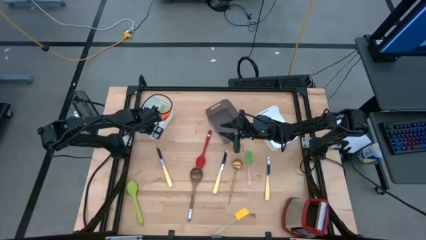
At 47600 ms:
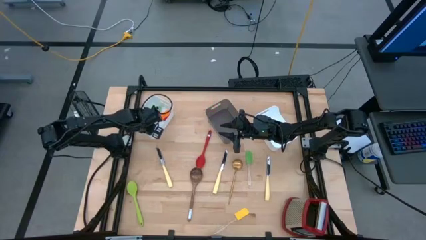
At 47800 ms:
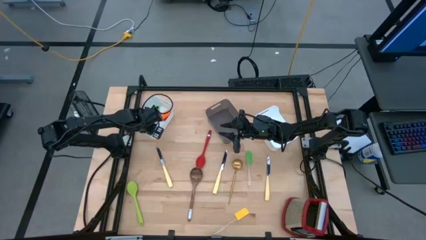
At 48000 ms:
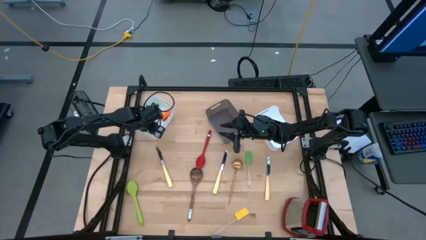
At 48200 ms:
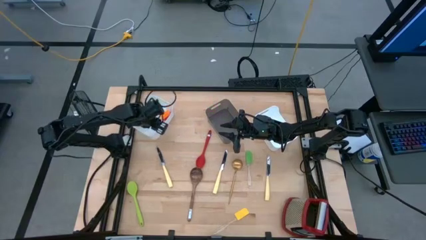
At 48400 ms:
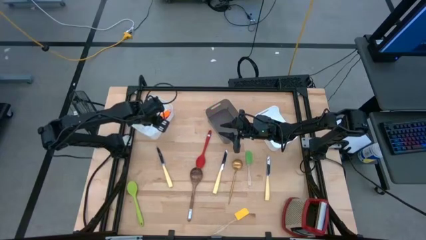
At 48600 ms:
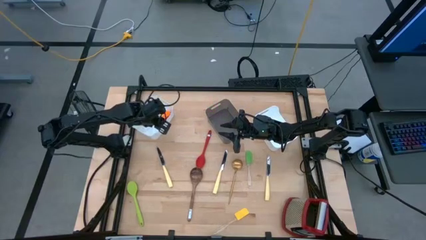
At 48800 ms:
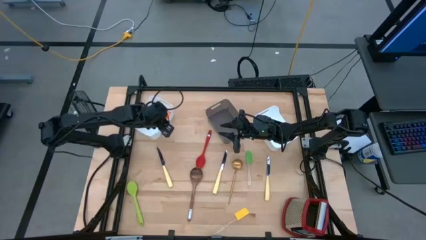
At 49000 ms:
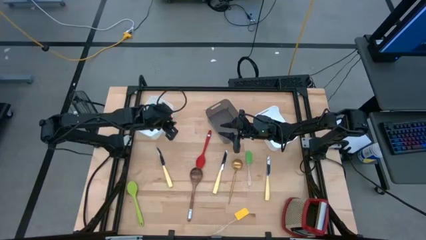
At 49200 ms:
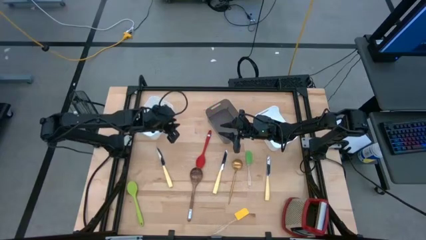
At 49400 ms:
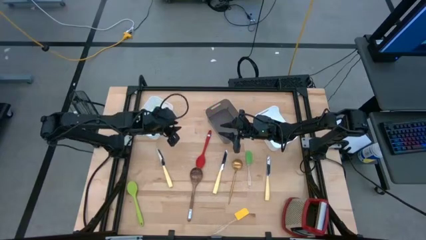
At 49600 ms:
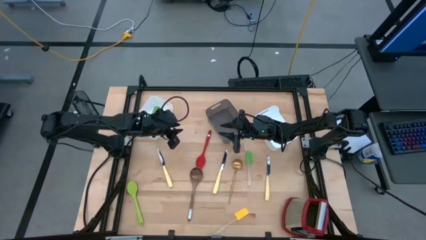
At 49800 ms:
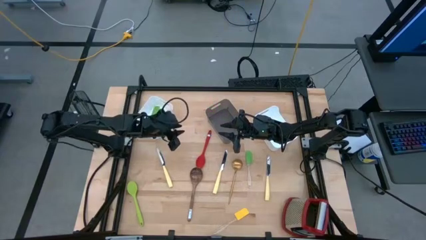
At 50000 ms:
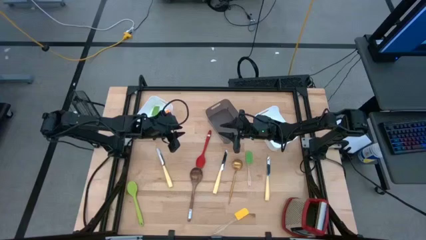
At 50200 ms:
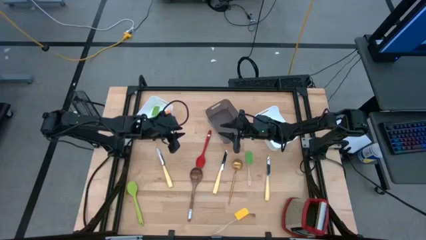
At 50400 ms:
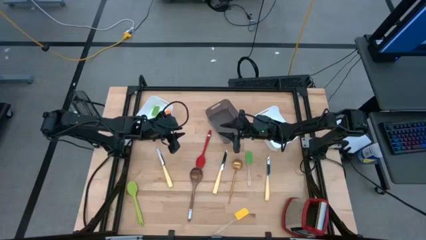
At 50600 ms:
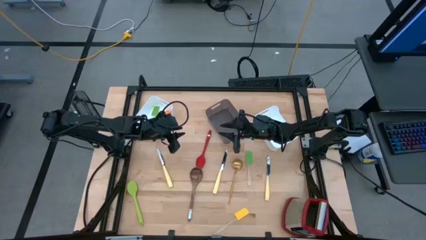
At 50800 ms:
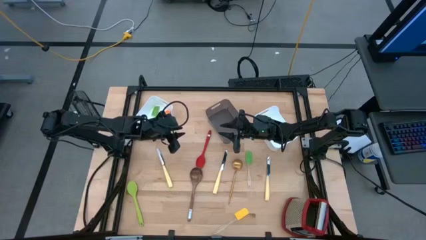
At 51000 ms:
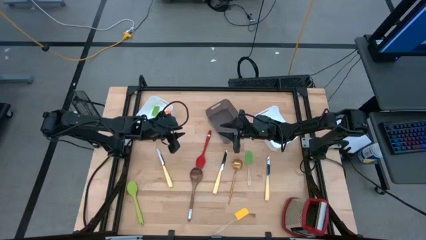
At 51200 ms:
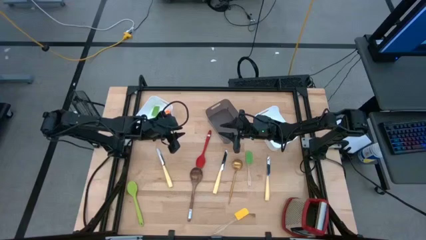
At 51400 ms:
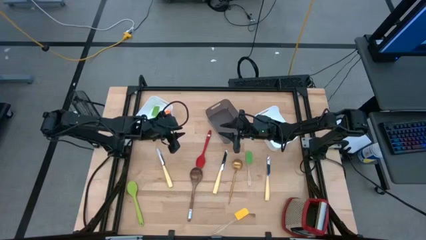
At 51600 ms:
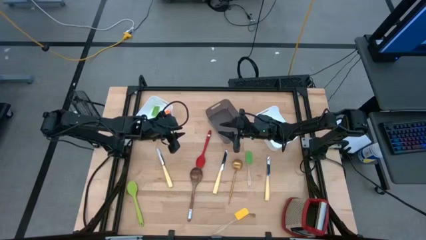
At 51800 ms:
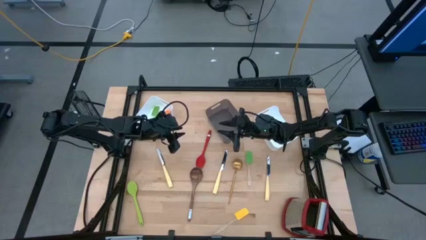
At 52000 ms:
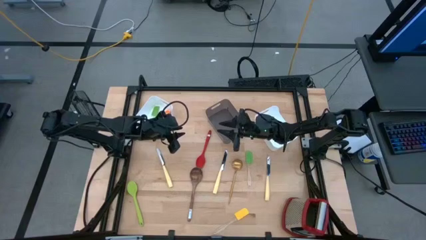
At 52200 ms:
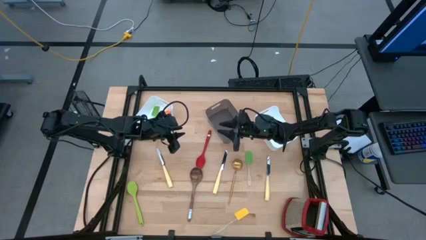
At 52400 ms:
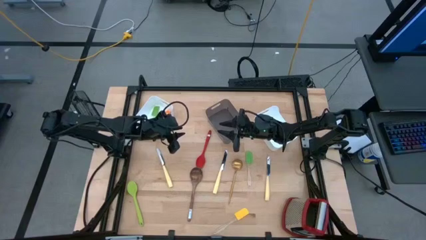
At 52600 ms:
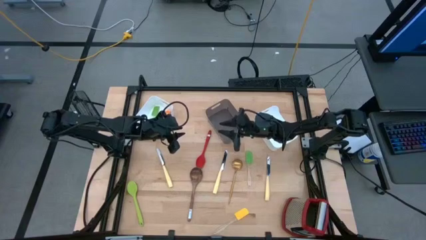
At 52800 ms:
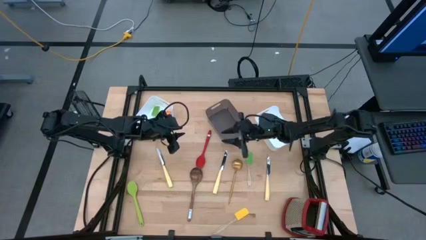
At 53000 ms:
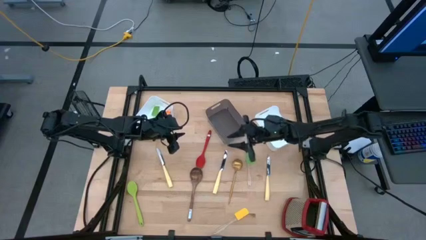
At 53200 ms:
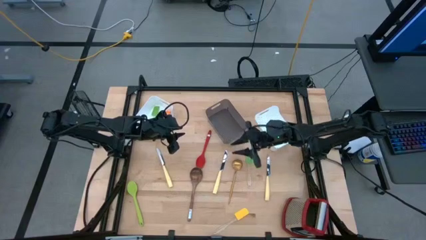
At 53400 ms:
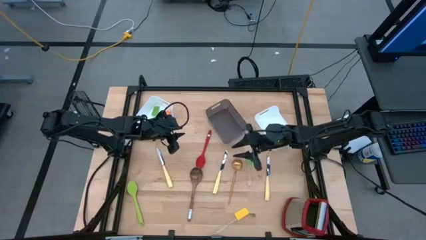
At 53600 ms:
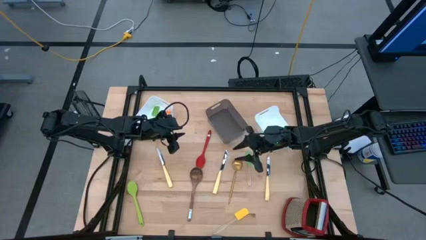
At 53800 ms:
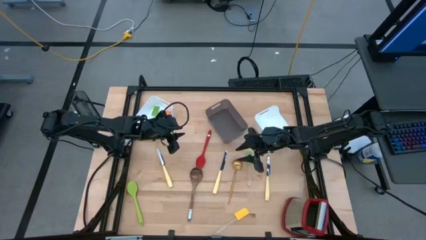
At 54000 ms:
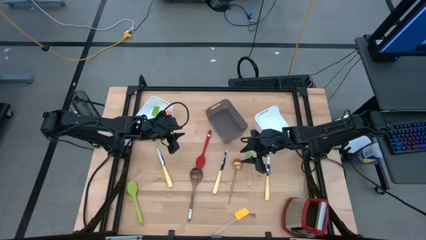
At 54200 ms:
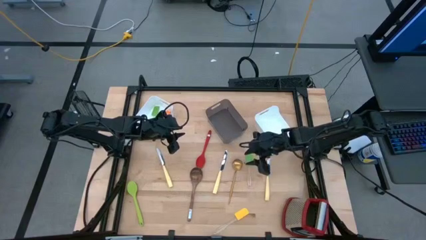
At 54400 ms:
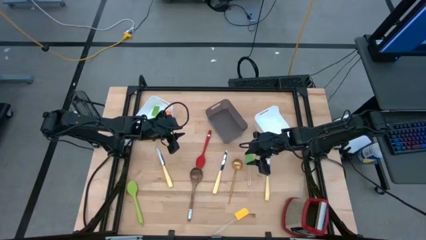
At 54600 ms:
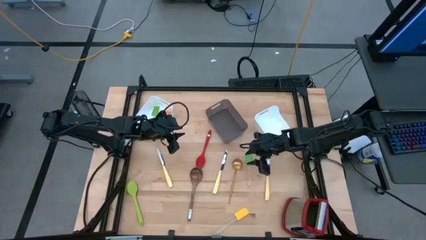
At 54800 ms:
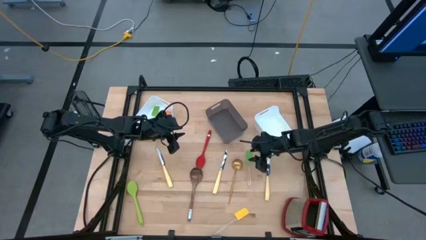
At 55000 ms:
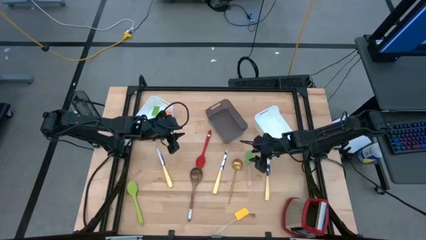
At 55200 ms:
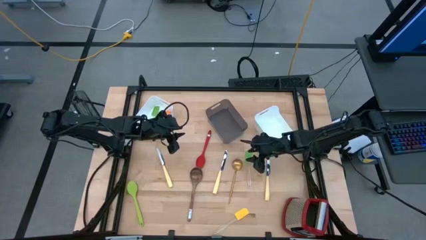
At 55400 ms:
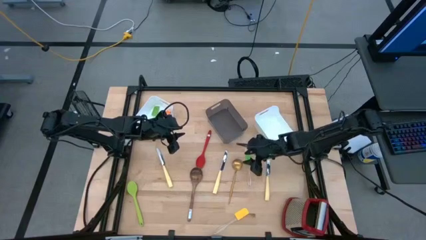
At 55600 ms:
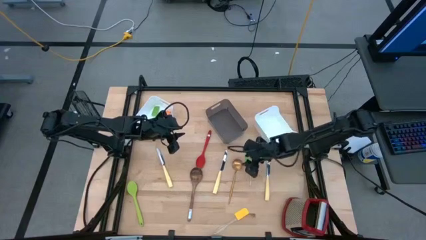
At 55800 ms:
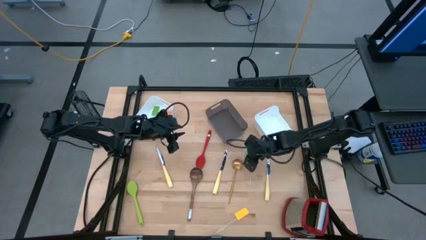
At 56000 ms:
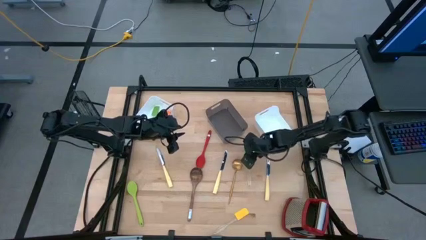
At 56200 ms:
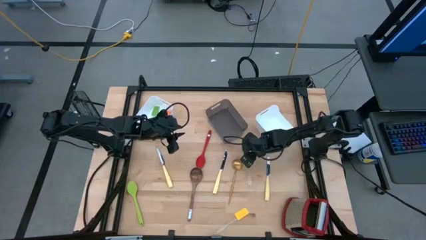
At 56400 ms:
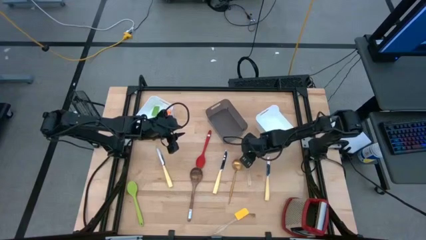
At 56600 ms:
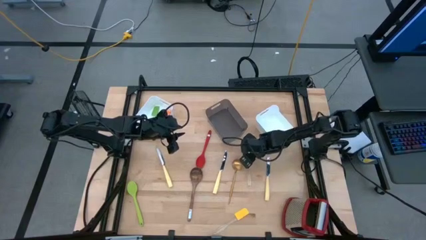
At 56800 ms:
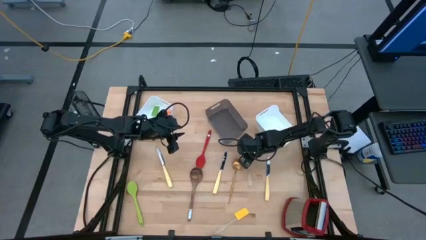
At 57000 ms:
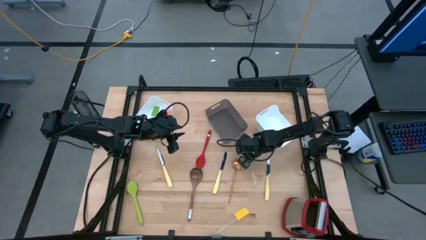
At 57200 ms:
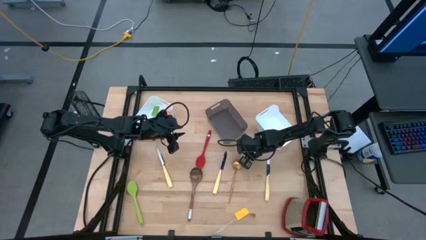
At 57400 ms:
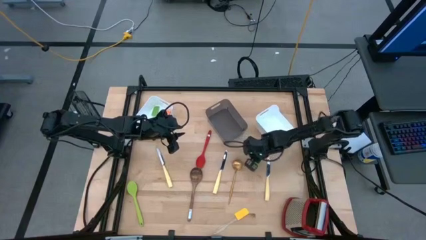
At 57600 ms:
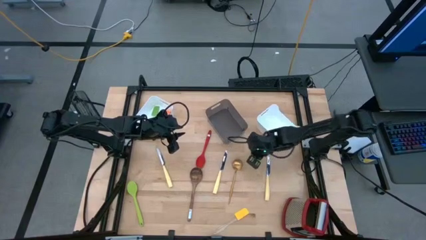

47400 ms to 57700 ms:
Task: Pick & Place Kitchen Items
Put the green spatula into the left white bin

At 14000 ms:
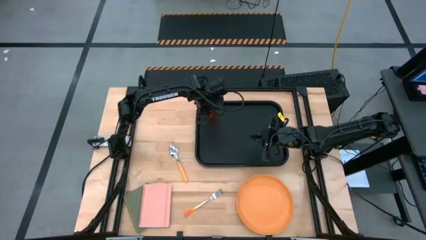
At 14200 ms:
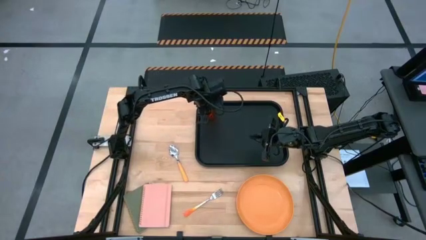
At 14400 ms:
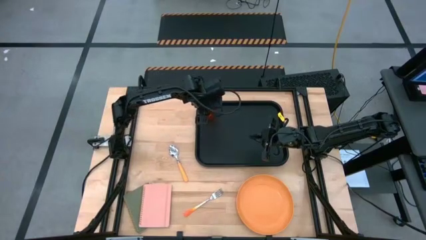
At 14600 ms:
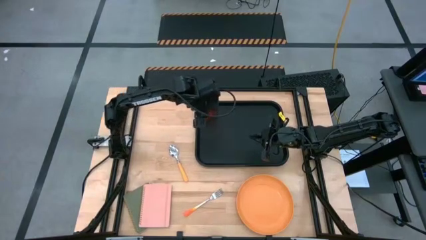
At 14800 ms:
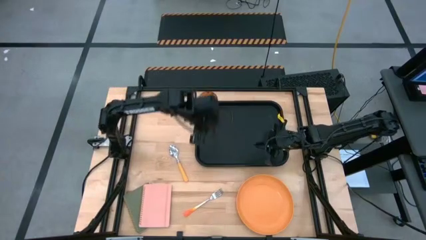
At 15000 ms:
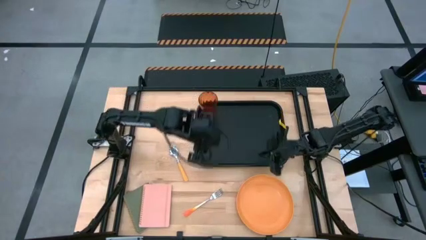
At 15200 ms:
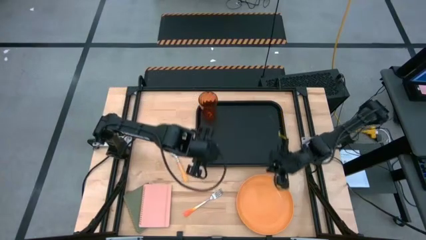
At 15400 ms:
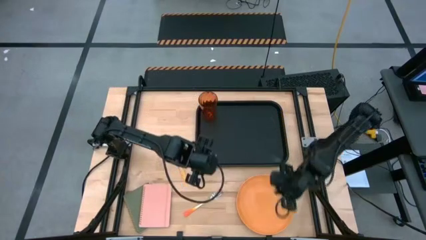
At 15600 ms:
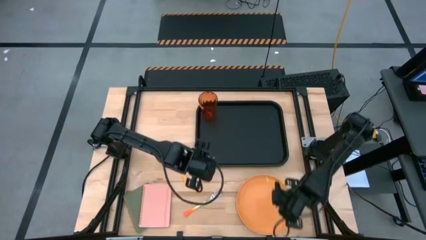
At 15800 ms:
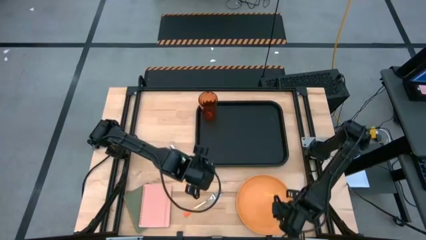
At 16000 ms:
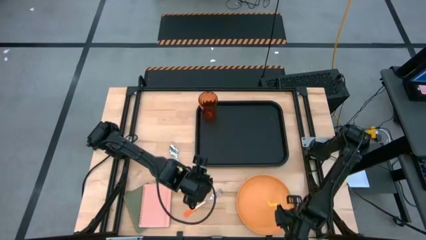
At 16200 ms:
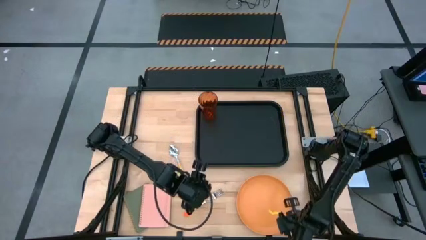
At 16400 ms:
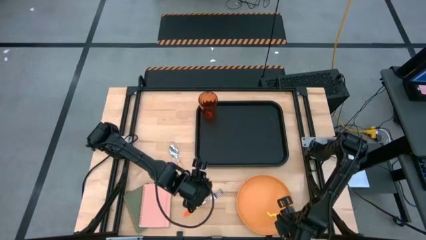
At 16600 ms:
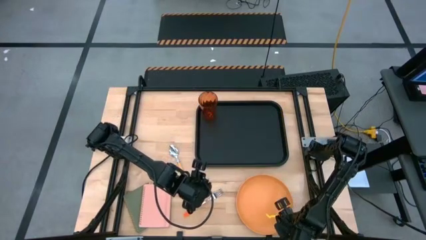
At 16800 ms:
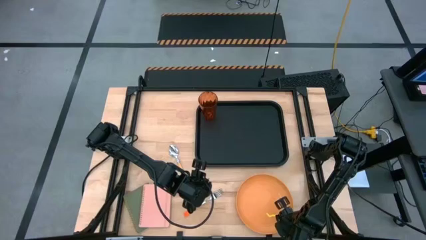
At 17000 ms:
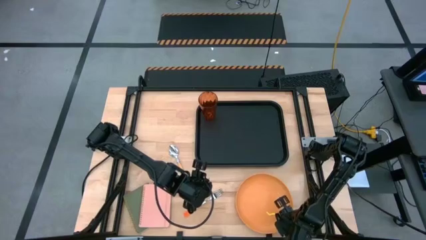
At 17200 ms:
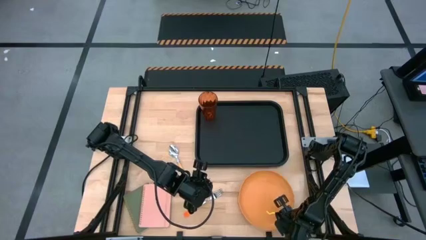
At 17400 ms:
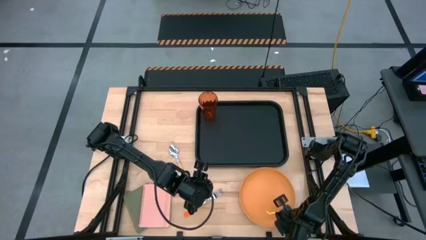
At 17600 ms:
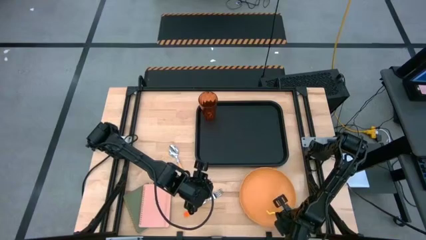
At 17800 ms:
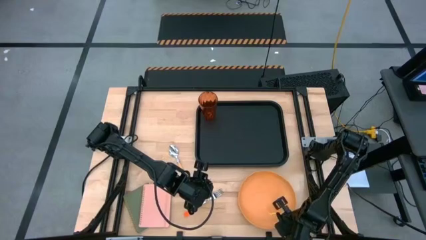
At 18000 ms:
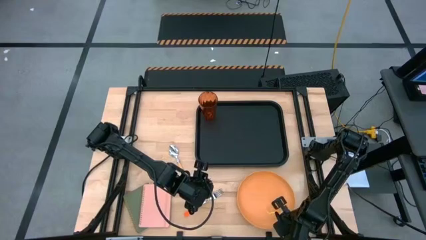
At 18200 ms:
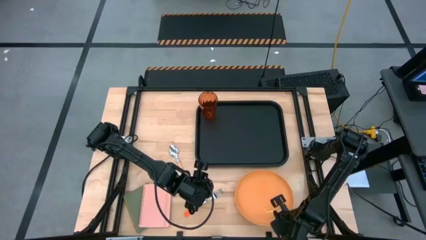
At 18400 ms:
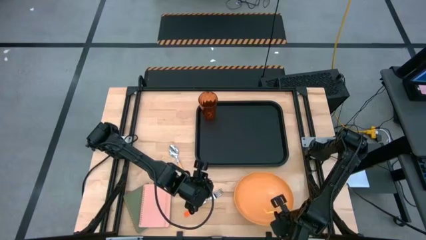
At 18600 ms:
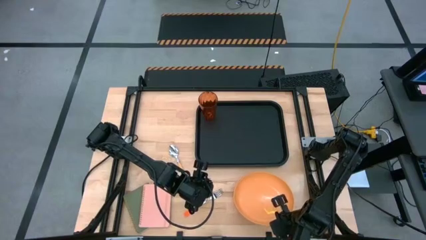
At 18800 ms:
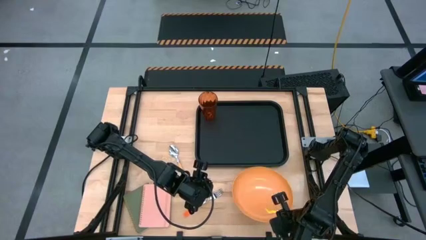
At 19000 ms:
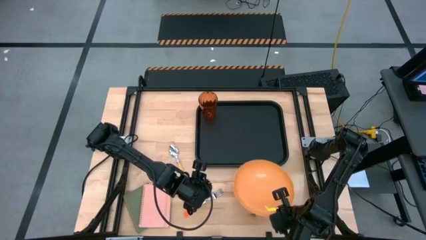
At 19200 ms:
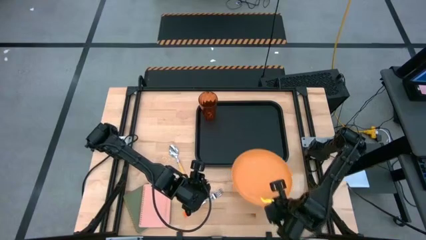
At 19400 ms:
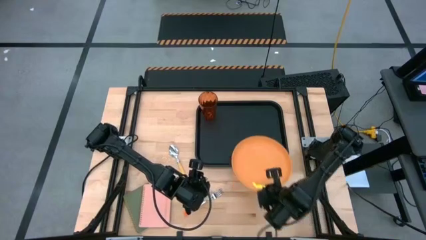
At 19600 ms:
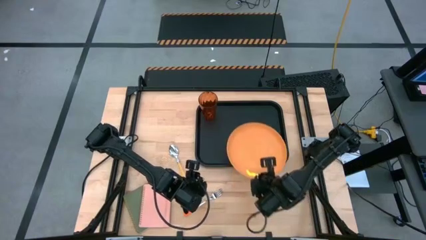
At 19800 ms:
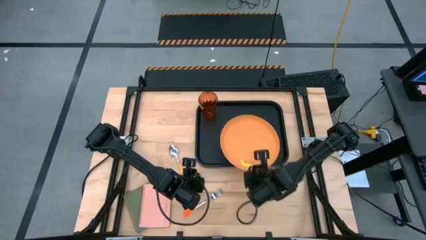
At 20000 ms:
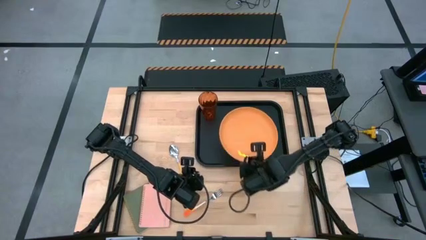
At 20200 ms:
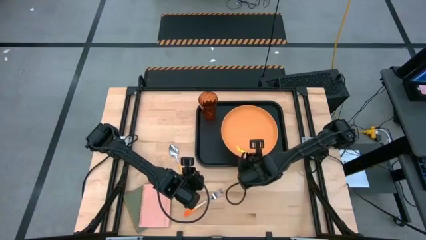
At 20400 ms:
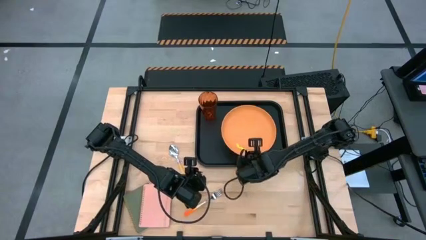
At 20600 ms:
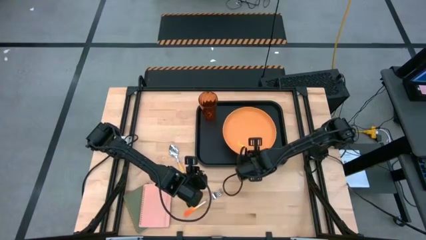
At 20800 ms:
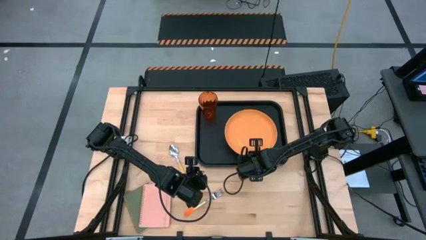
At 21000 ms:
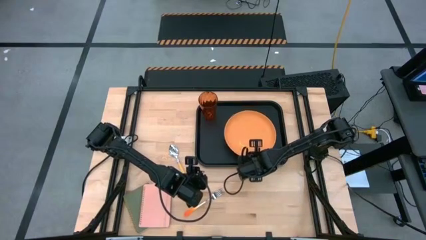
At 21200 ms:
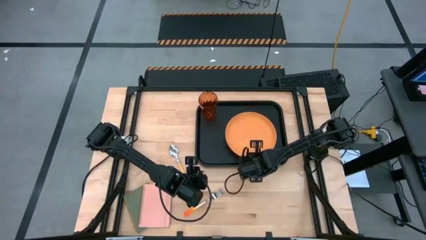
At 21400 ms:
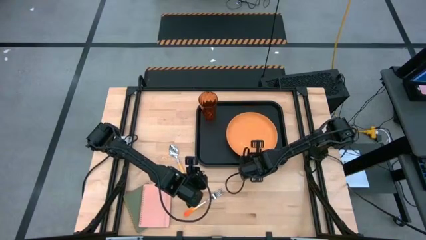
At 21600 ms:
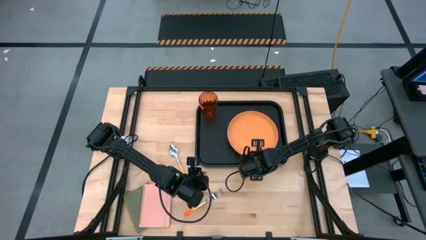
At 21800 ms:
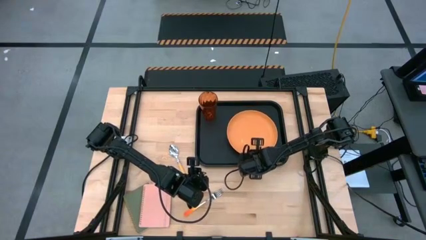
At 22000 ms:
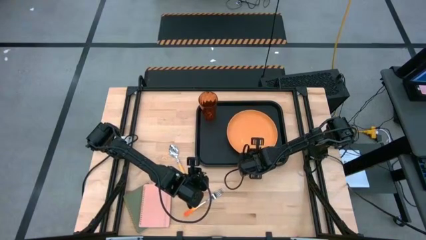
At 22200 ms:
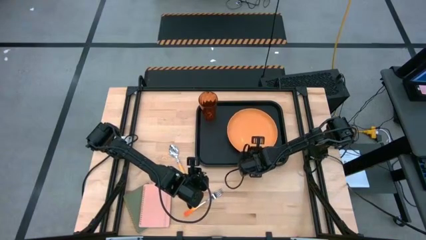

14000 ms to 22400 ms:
Task: Pick and place plate/cup/fork/spoon on tray
Put the orange plate on the right side of the black serving tray
